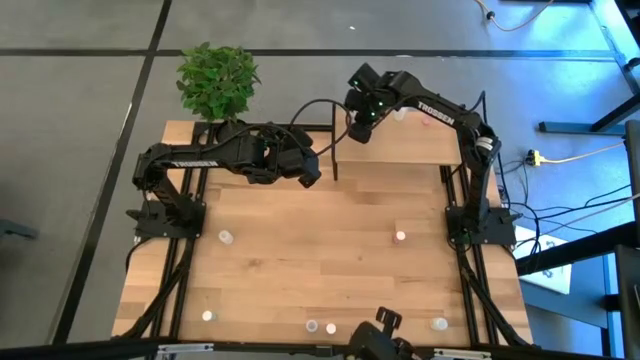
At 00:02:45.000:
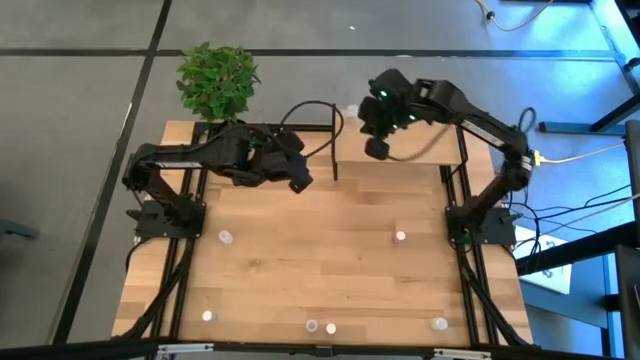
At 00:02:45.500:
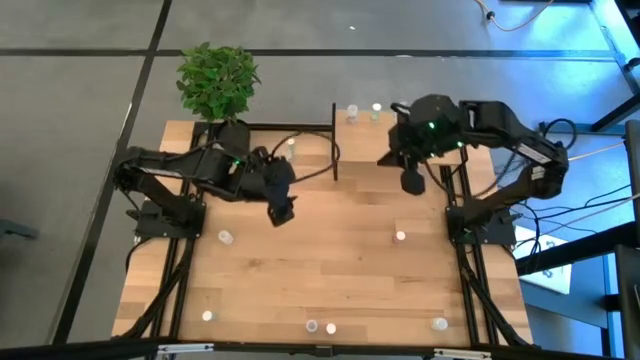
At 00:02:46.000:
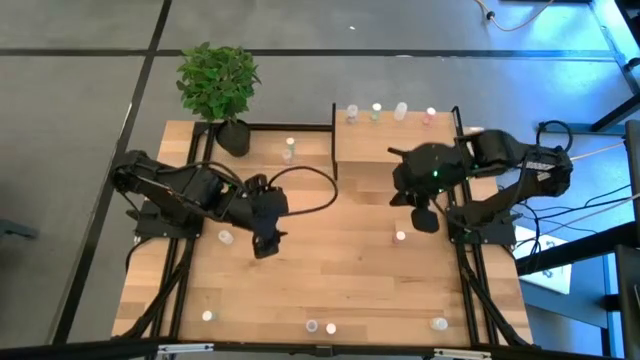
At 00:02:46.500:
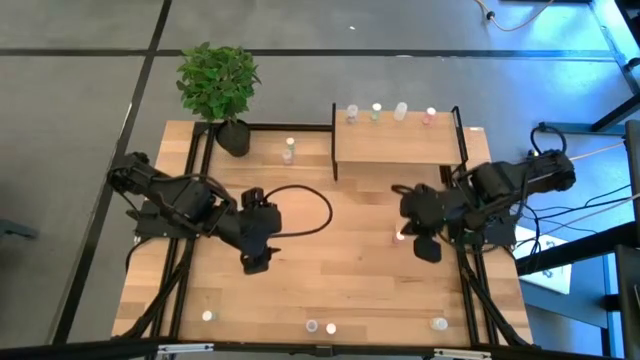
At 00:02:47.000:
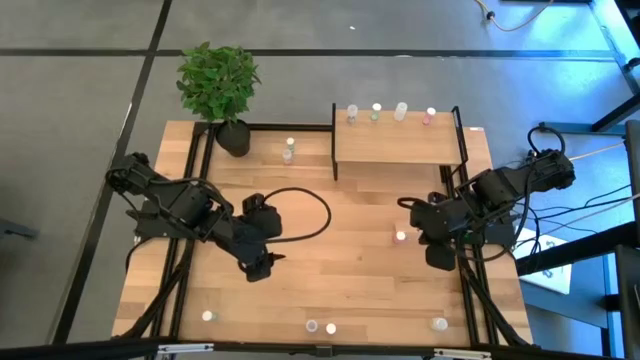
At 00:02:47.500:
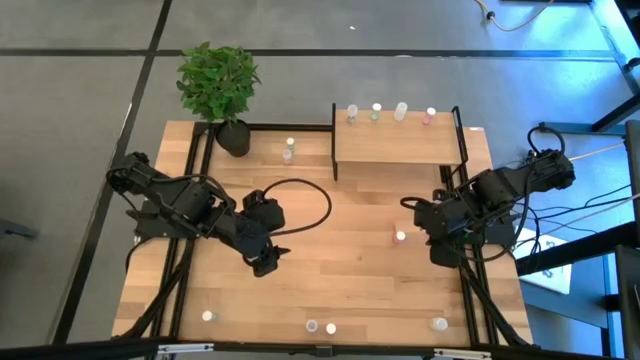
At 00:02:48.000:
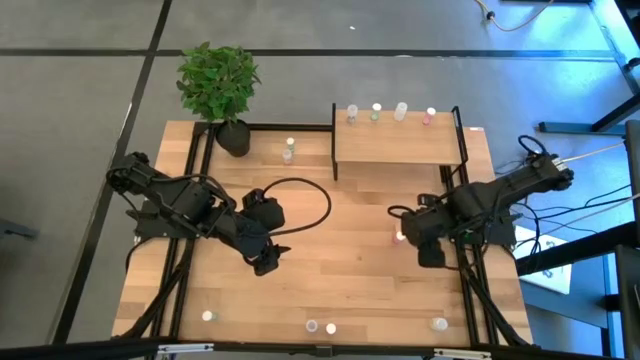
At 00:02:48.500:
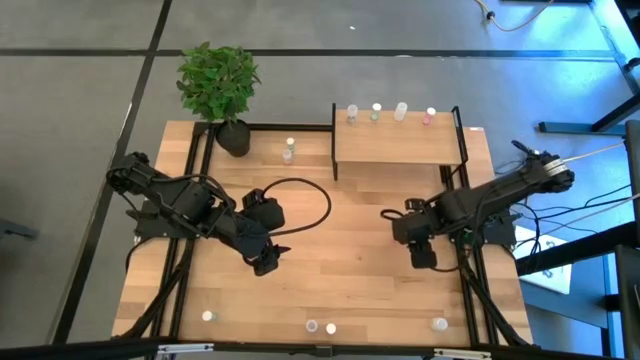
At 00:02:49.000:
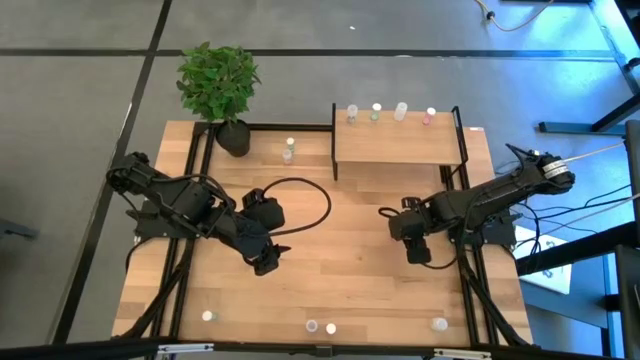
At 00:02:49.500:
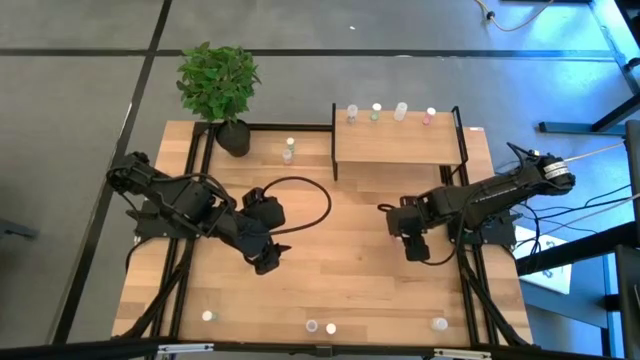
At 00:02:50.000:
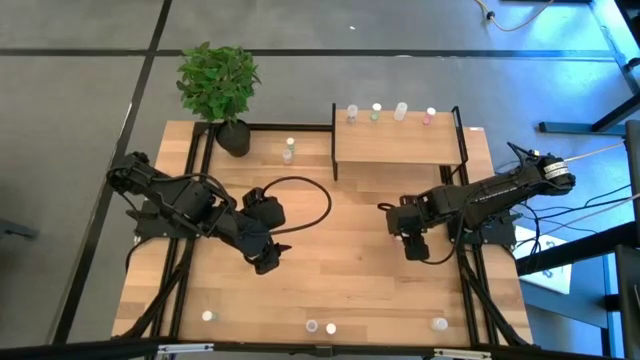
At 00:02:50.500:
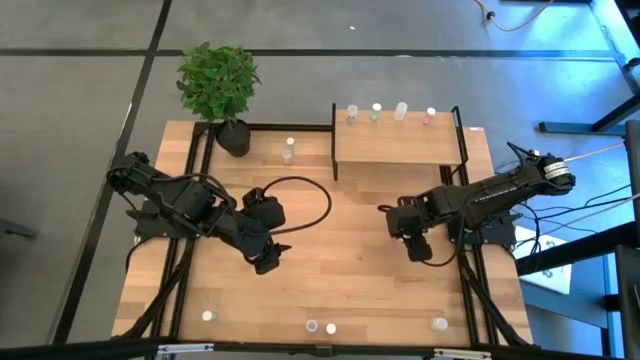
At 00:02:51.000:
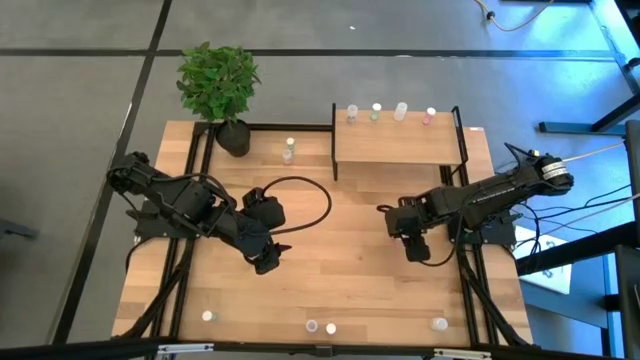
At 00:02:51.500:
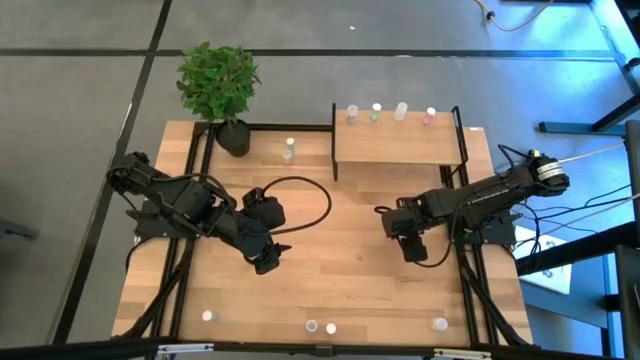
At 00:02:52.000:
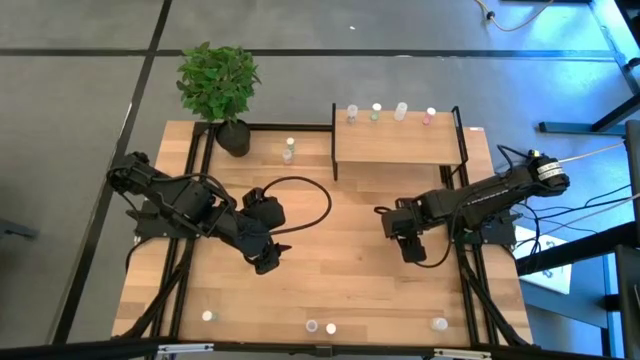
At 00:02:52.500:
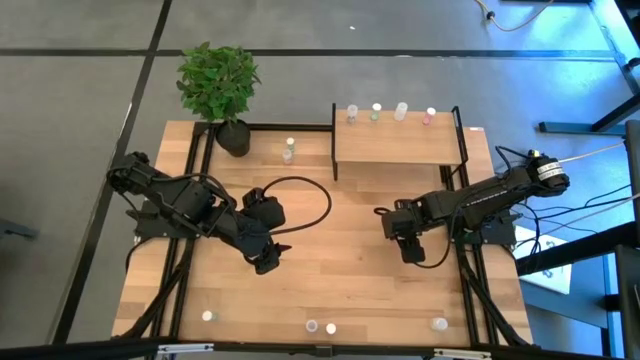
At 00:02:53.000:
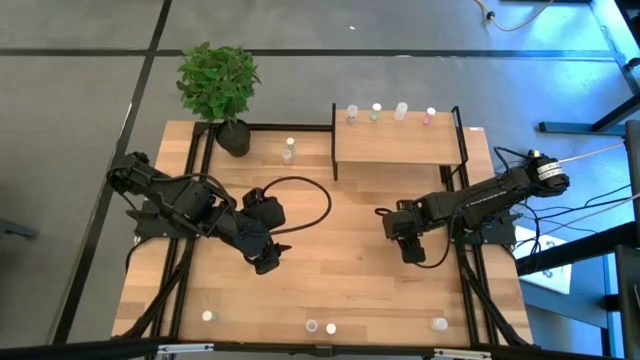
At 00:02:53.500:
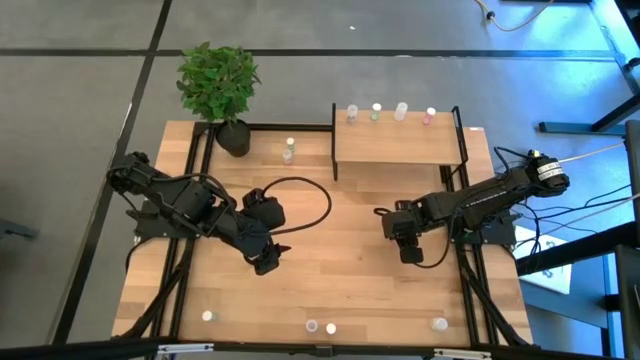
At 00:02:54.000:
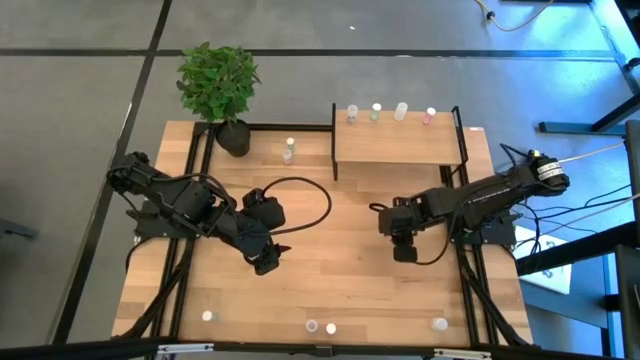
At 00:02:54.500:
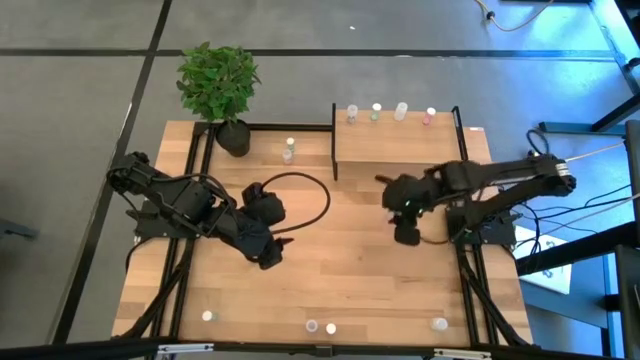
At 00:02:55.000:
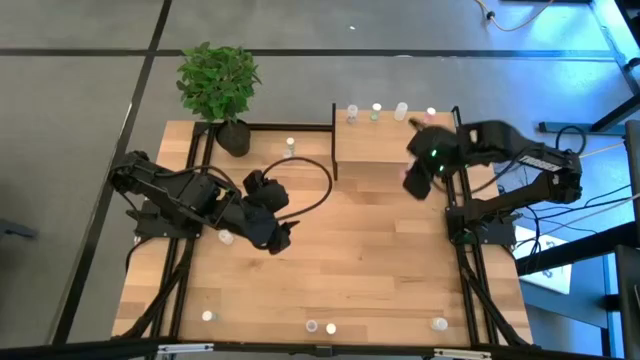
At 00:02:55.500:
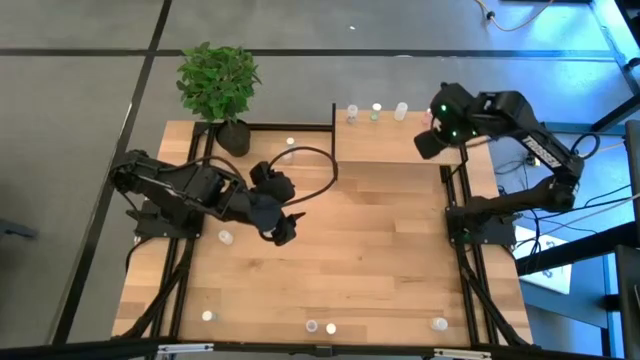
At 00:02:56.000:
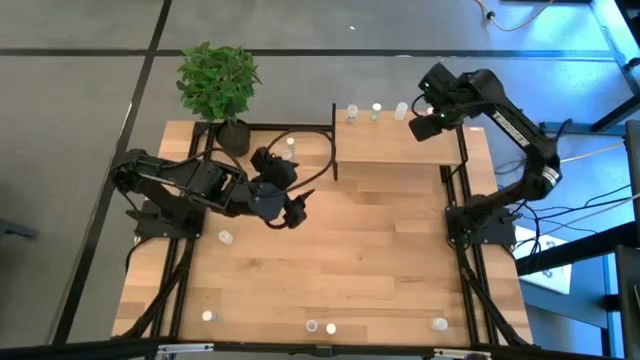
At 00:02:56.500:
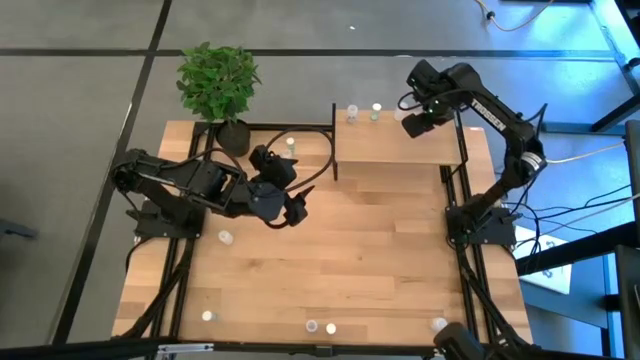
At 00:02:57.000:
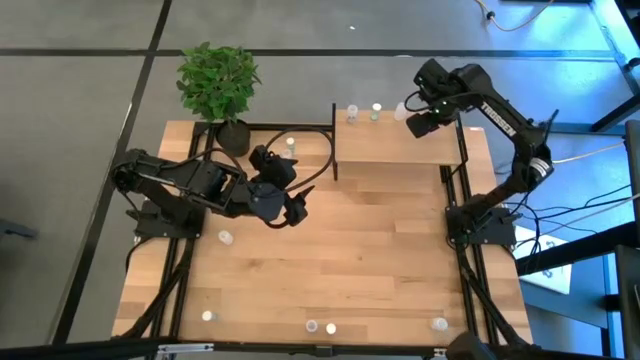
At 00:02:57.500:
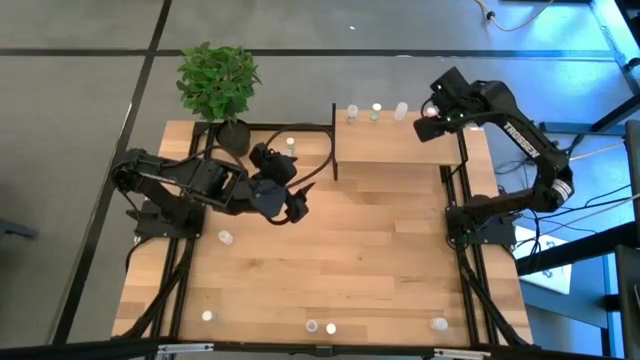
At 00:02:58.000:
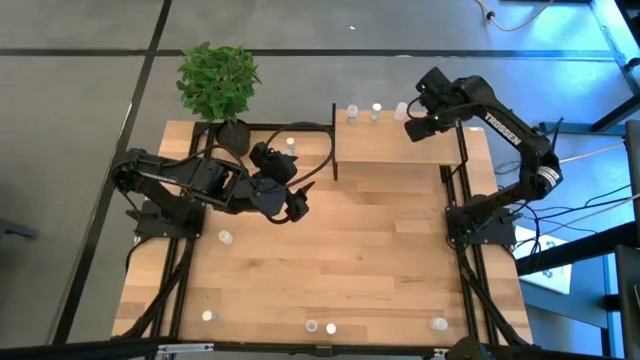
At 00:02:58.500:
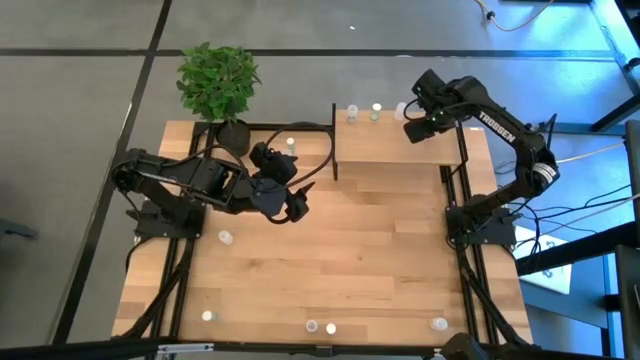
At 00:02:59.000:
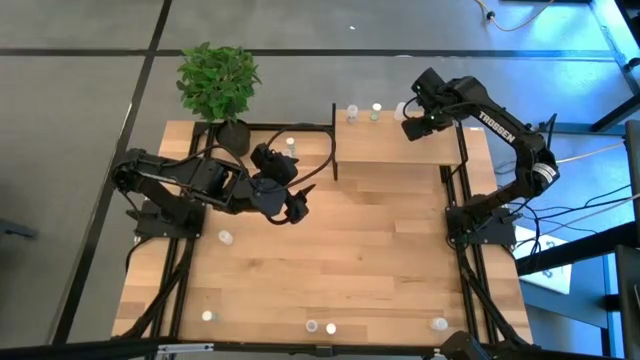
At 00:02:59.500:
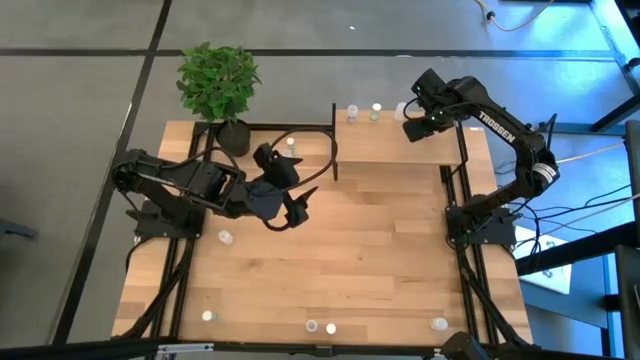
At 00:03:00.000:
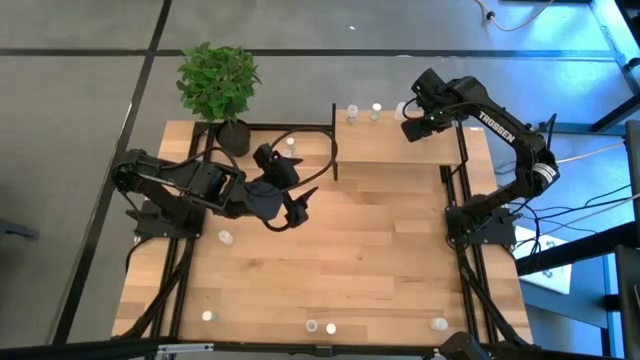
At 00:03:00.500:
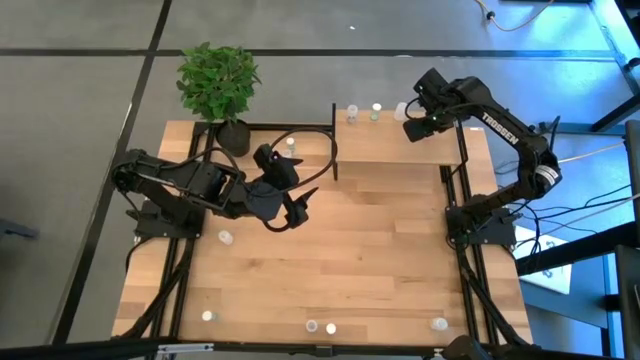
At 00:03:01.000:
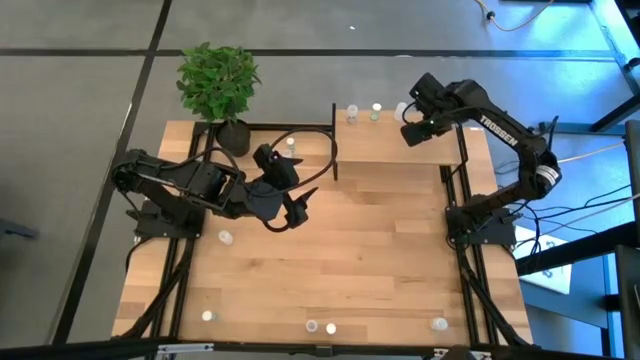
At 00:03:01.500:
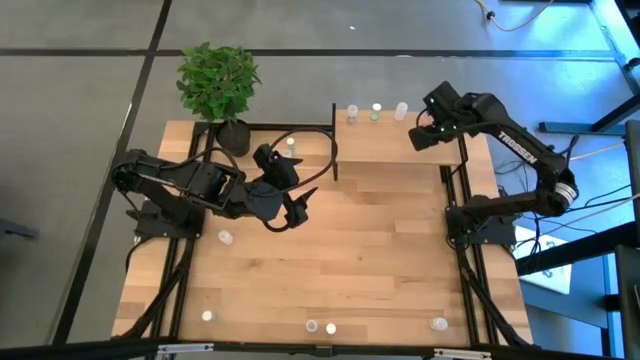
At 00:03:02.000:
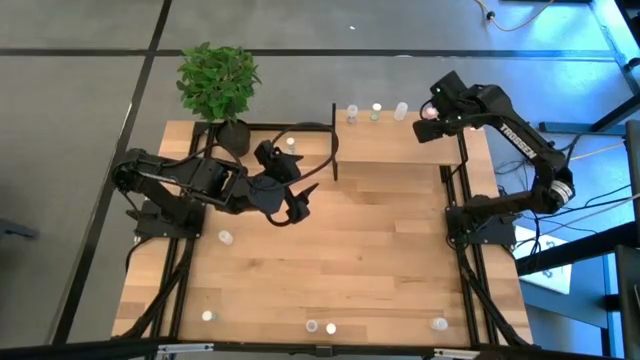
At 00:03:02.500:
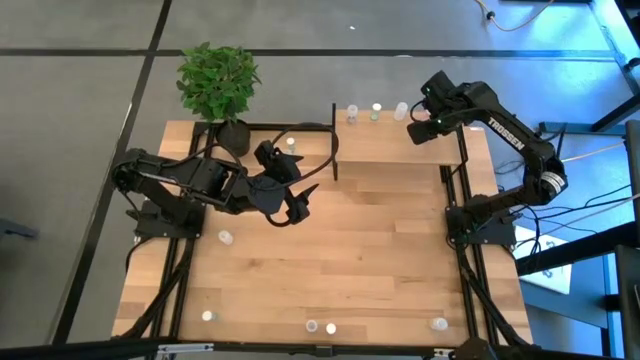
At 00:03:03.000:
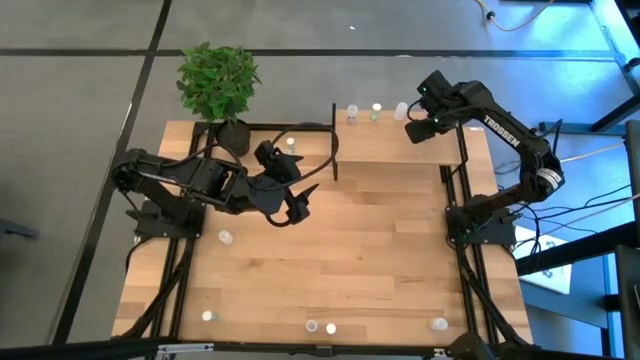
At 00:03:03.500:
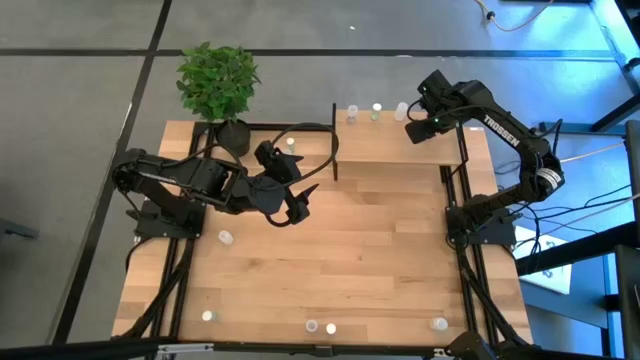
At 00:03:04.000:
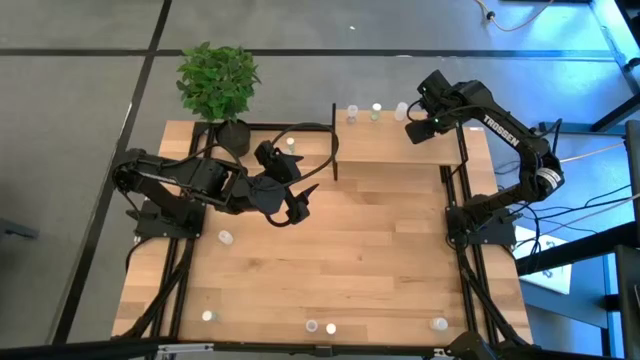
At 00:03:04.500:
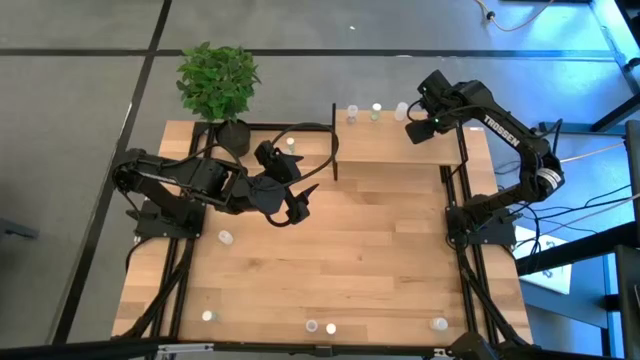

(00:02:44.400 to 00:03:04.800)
Task: Pick and place medicine bottles onto shelf by color
Put the top pink pill bottle aligned with the other pink bottle on the shelf
